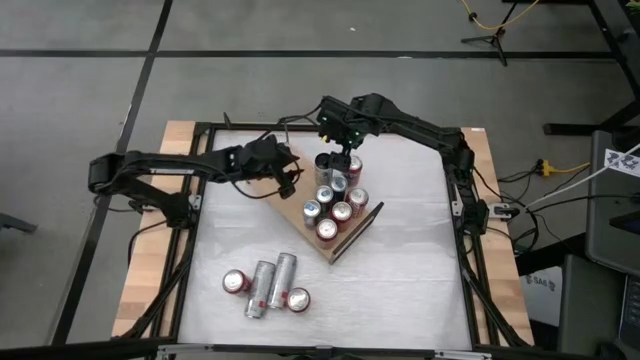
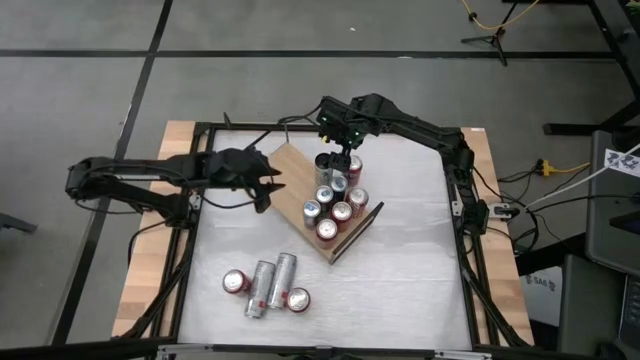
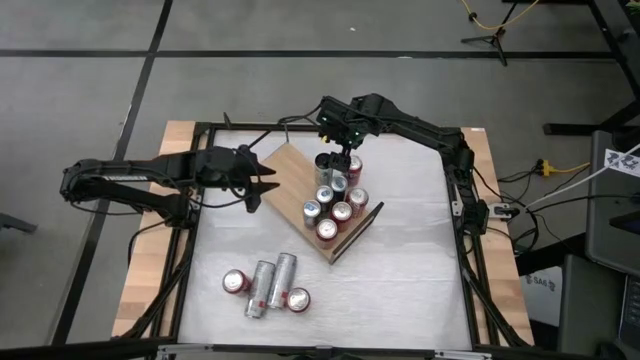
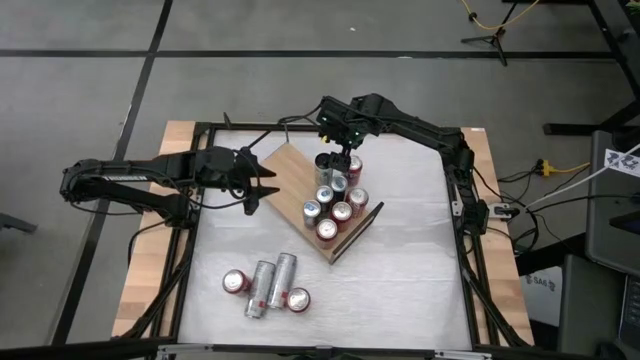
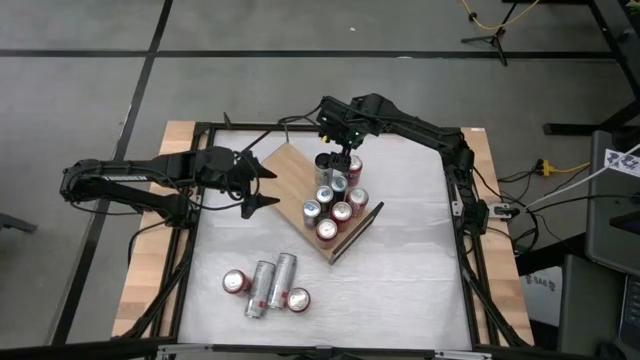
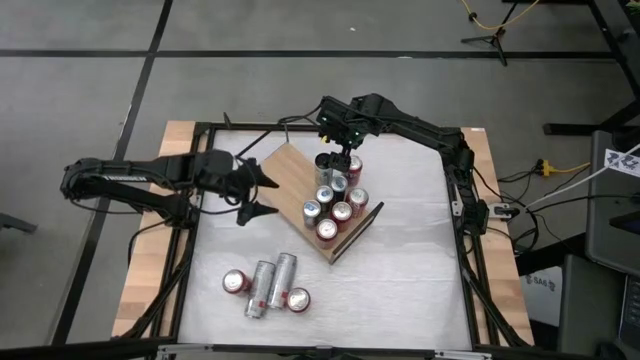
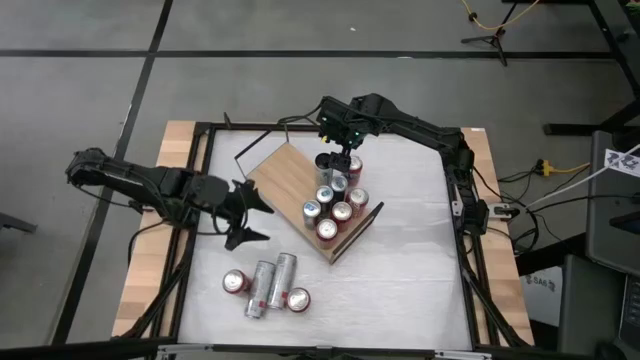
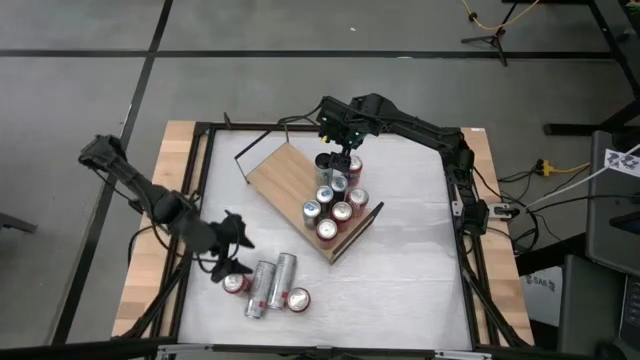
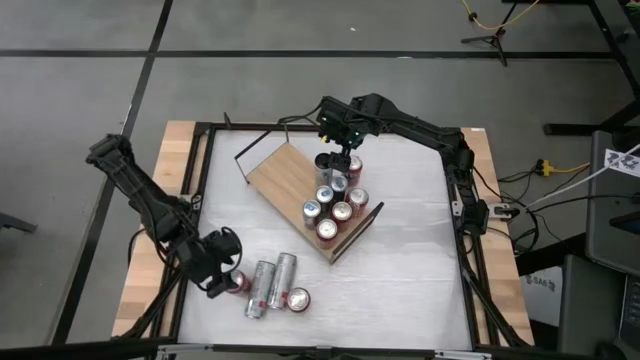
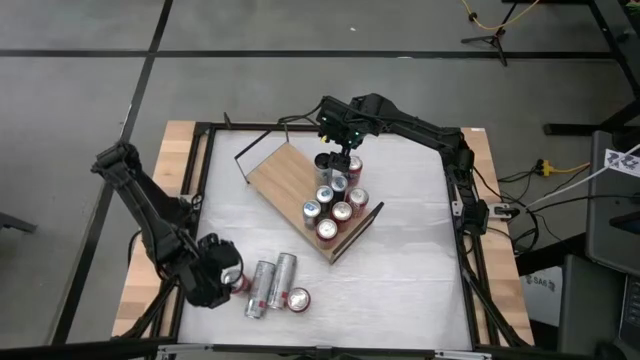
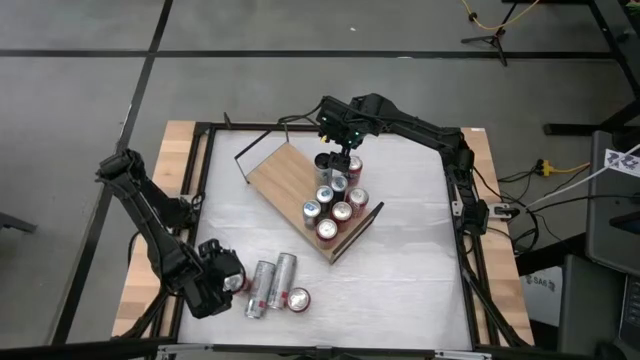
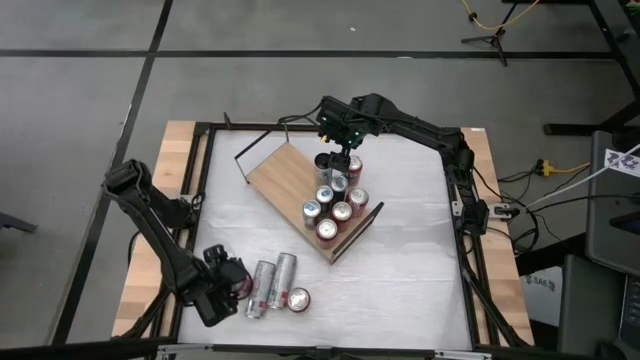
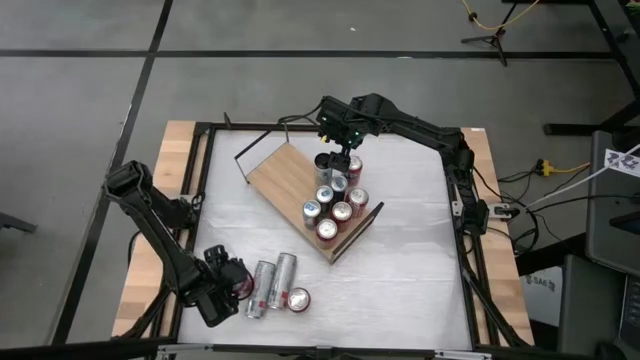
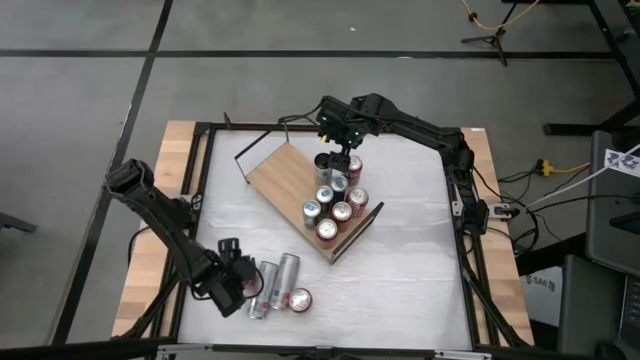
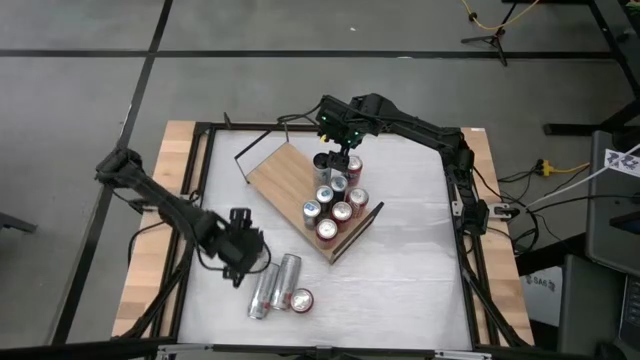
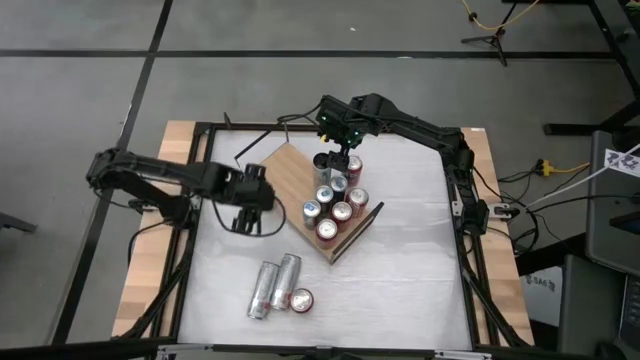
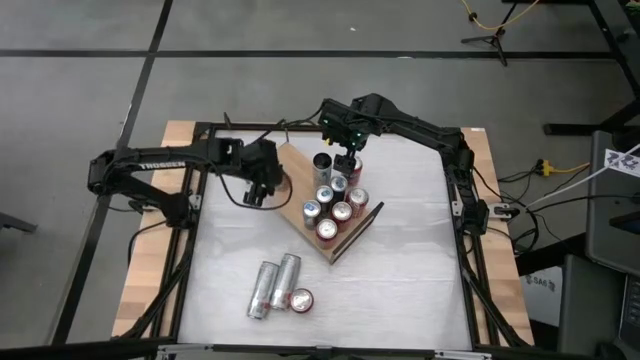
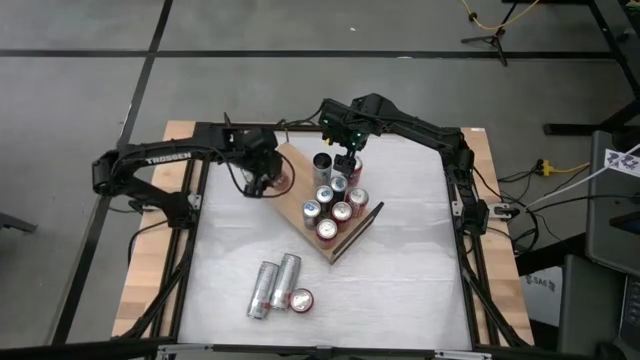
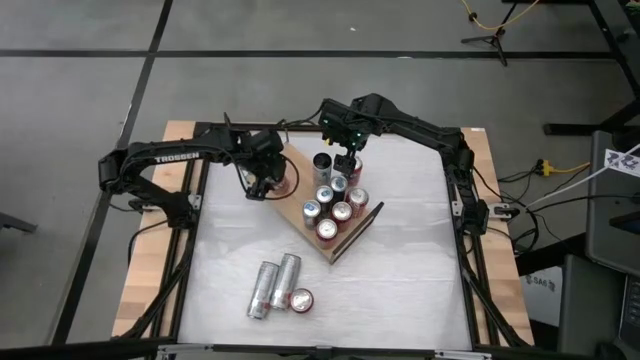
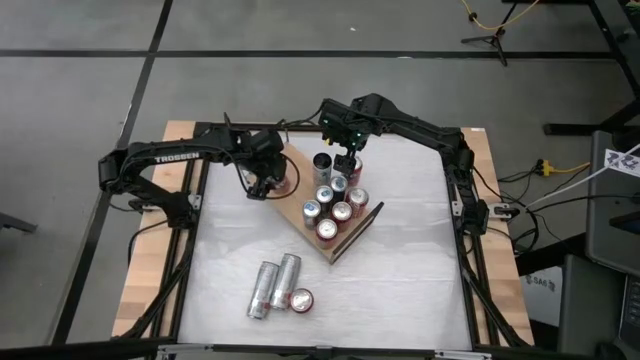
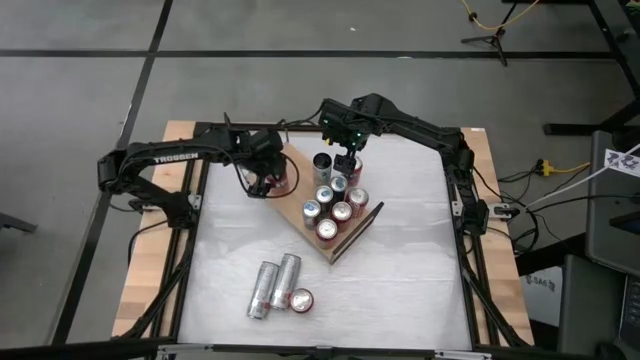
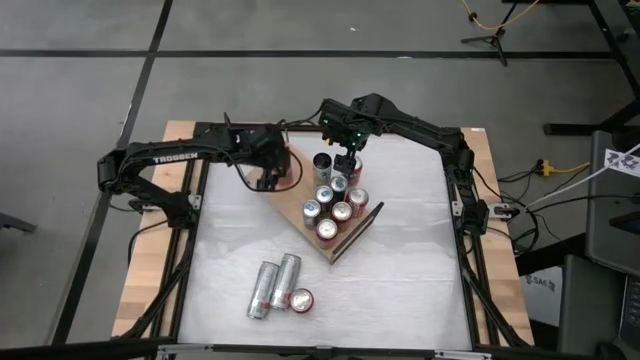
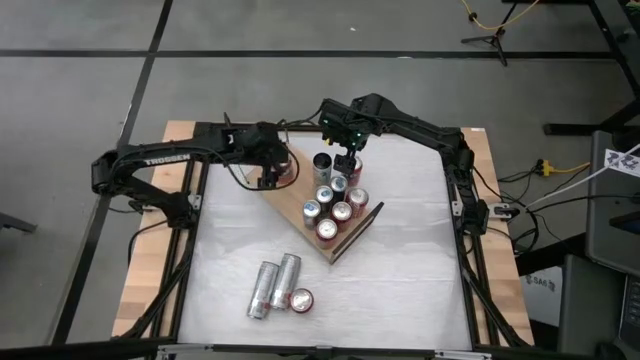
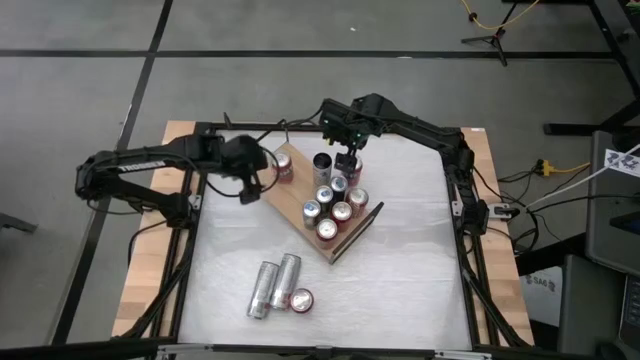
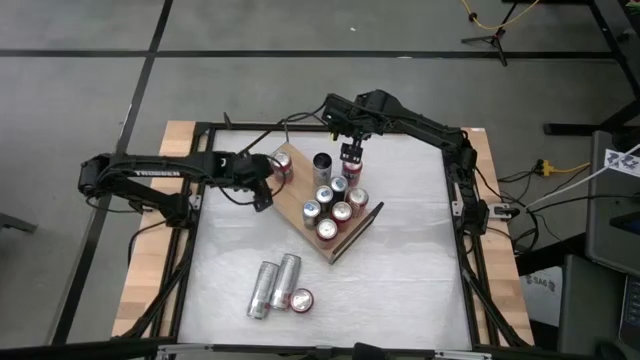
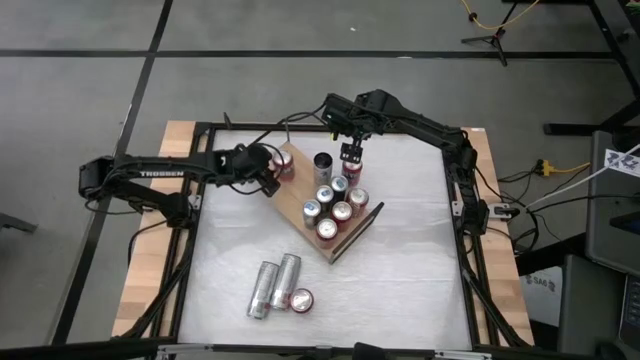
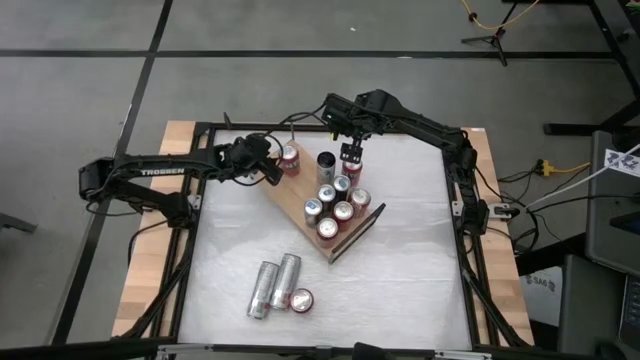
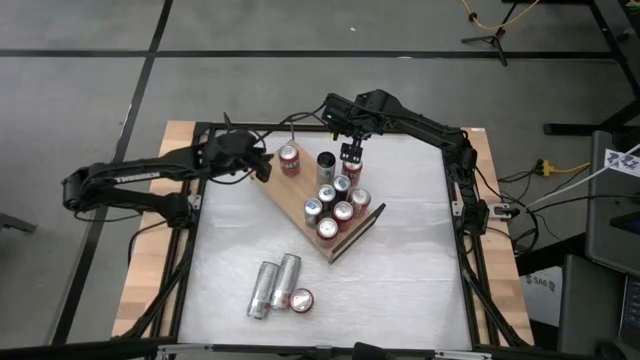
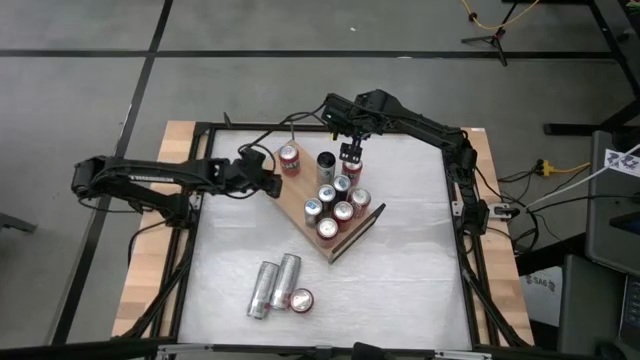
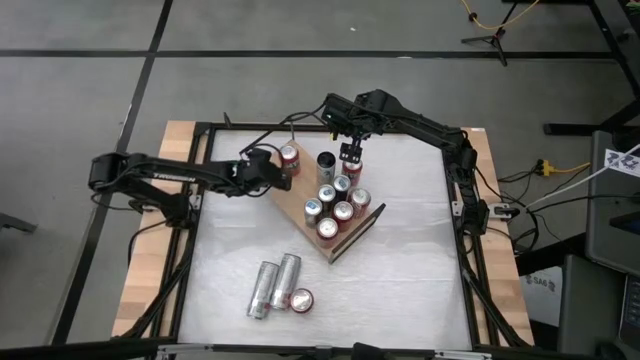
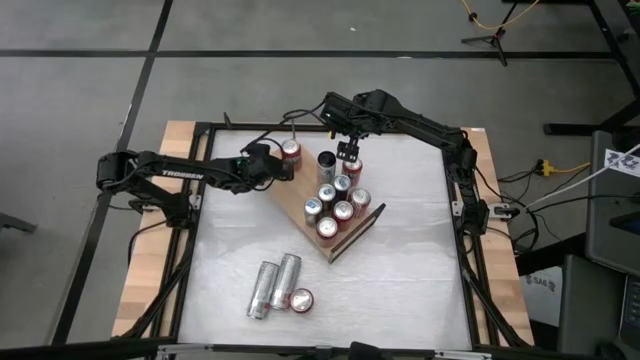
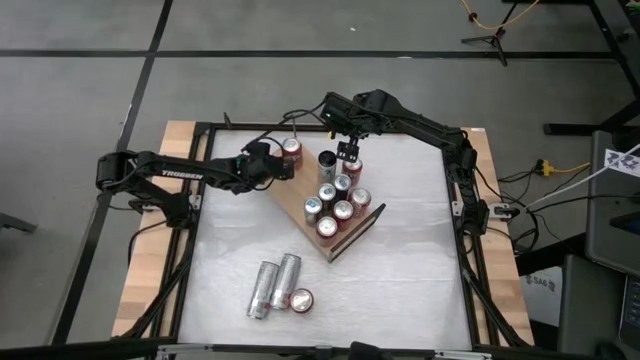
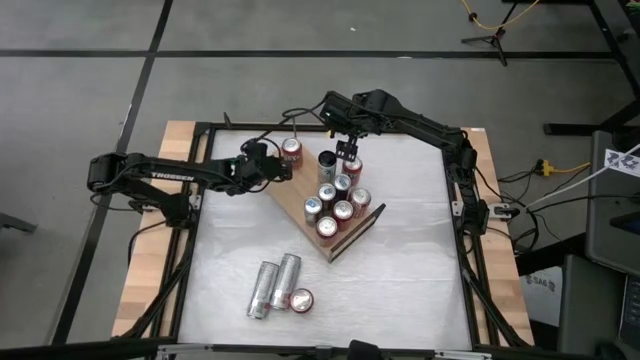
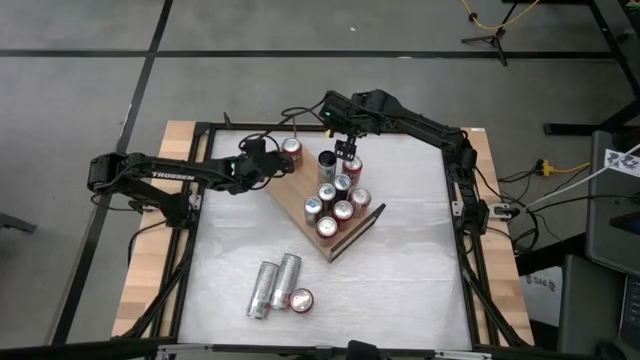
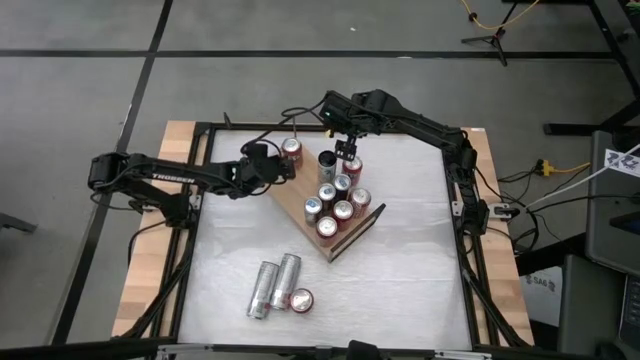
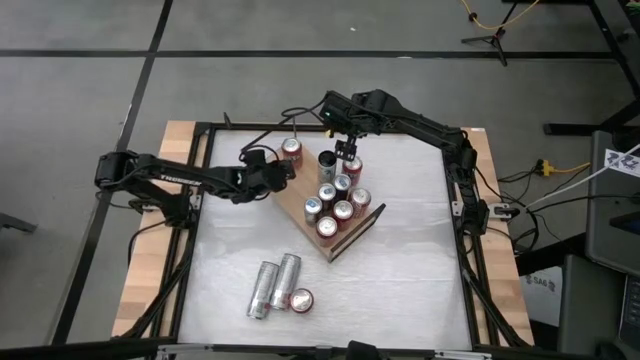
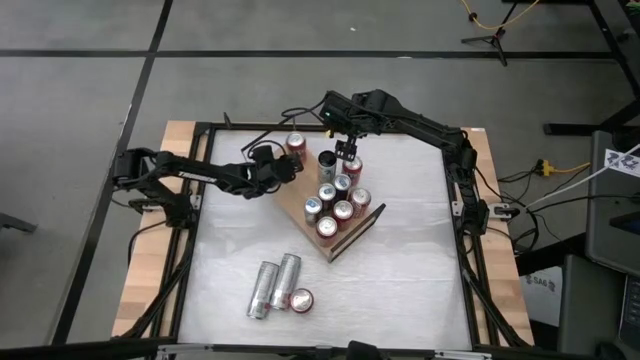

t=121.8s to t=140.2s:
Task: Place canned beverage on shelf
Put the bottom left red soda can on the shelf

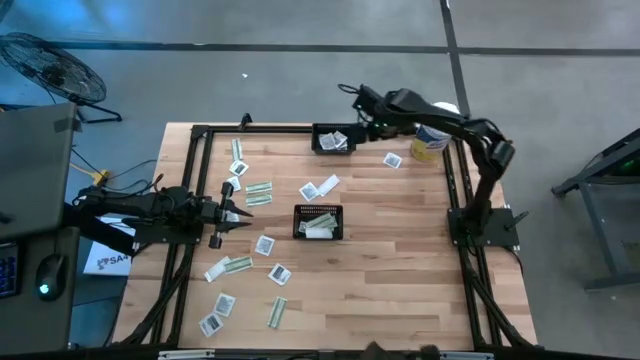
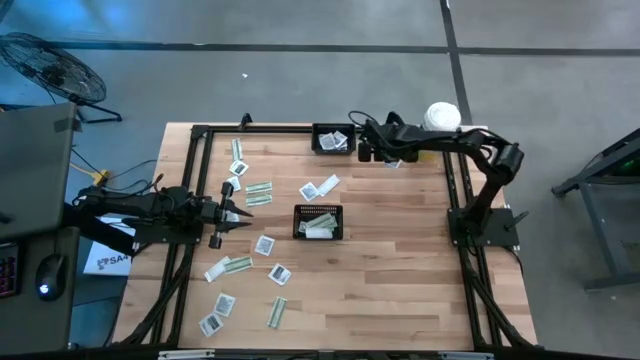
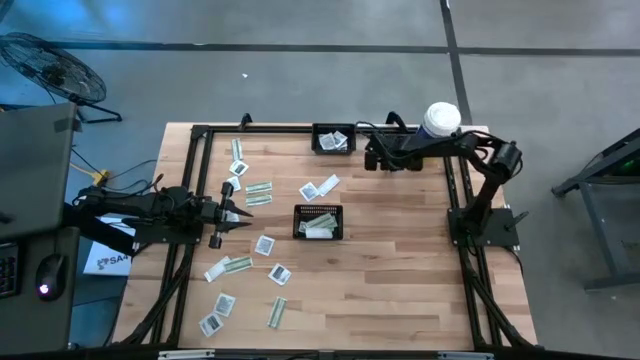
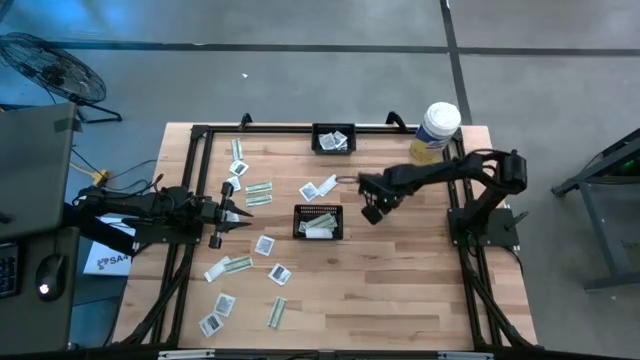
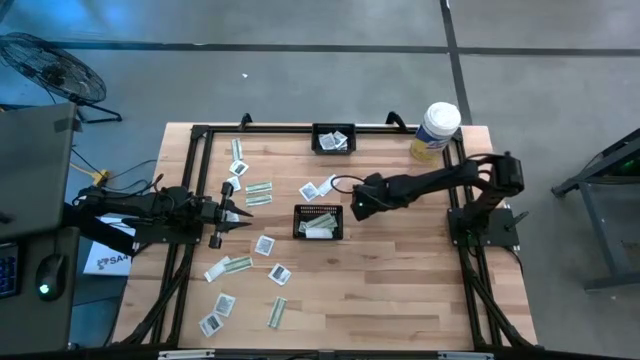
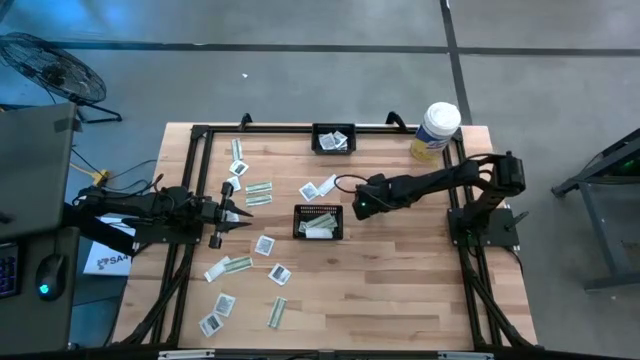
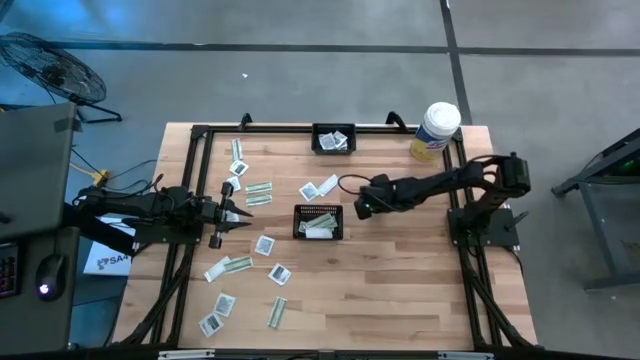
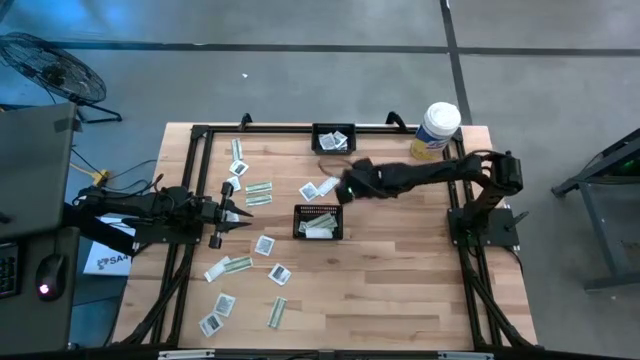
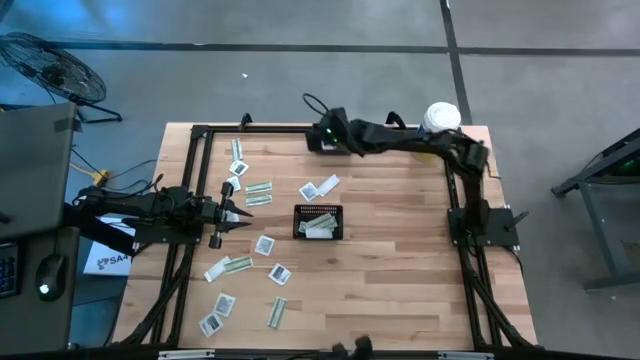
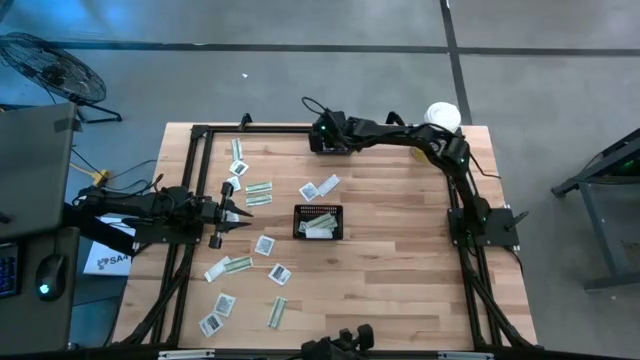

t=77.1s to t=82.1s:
Task: Pick & Place First Aid Supplies
Put the towelette pack into the top black basket
